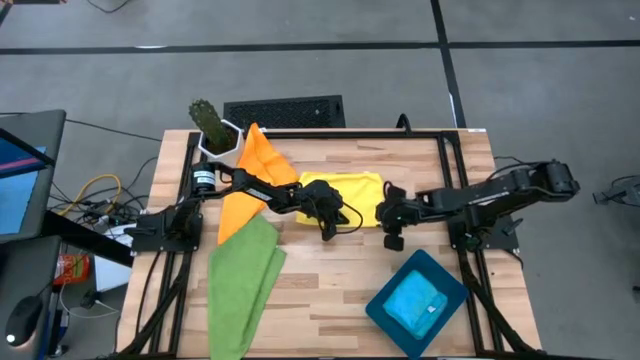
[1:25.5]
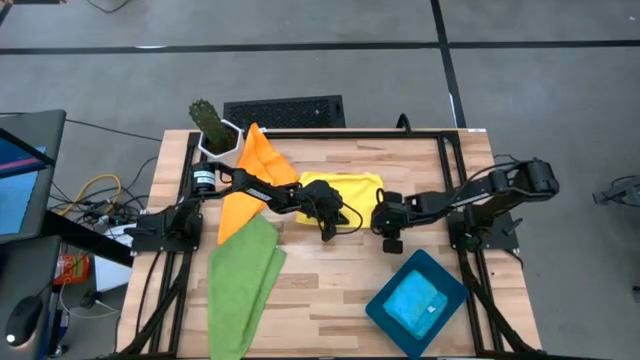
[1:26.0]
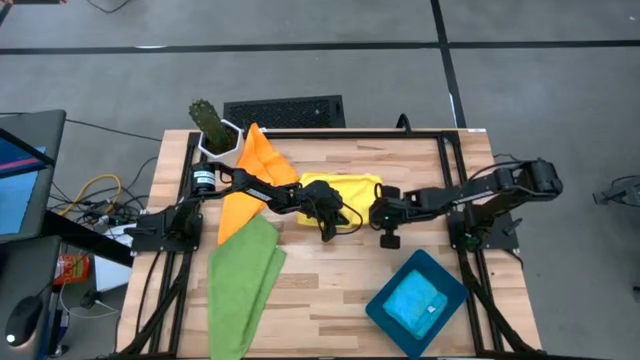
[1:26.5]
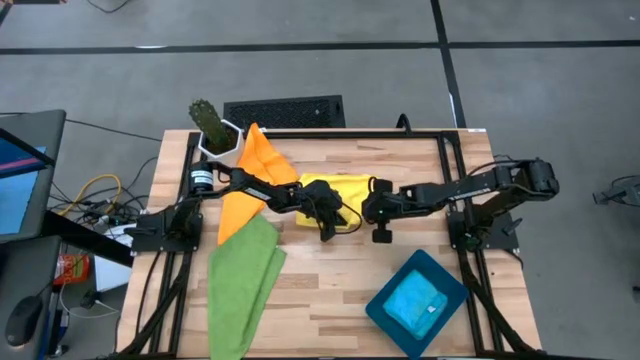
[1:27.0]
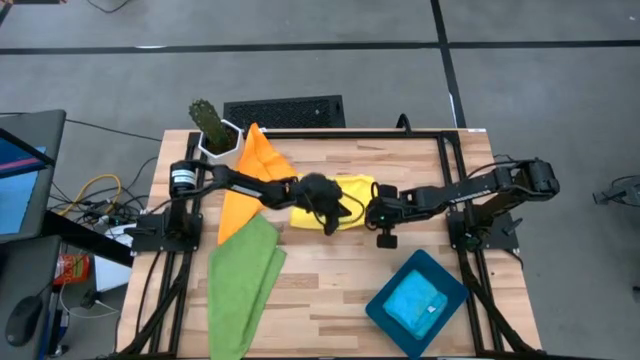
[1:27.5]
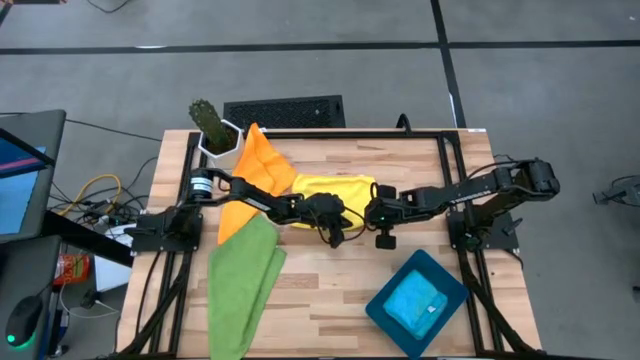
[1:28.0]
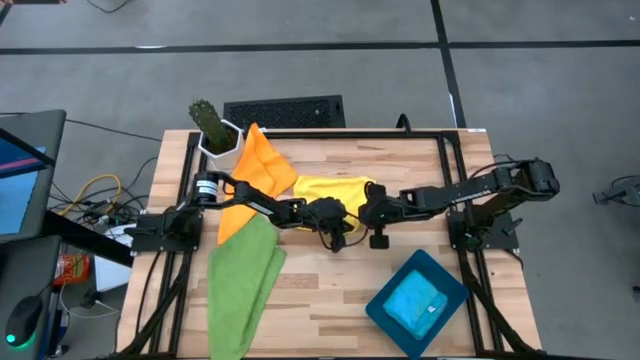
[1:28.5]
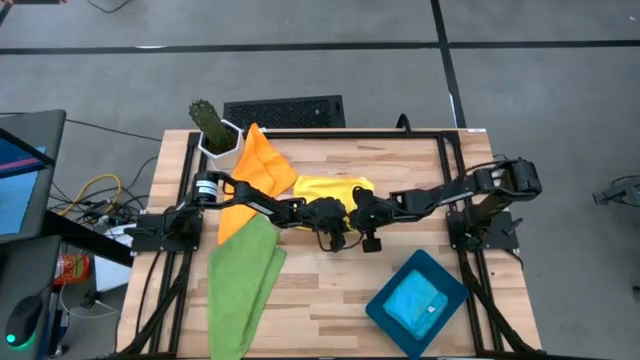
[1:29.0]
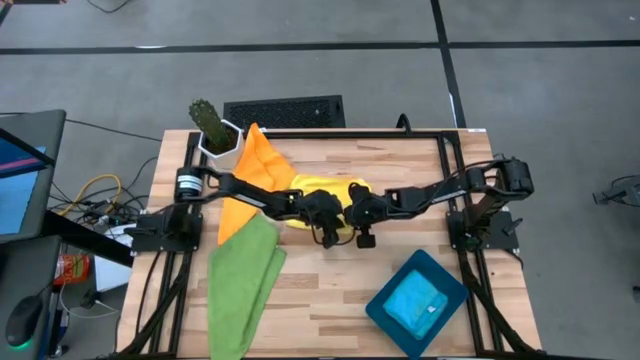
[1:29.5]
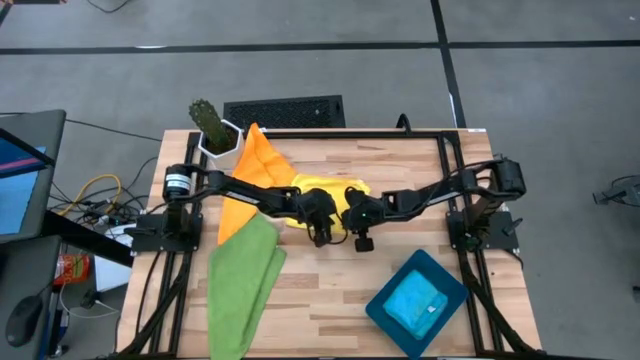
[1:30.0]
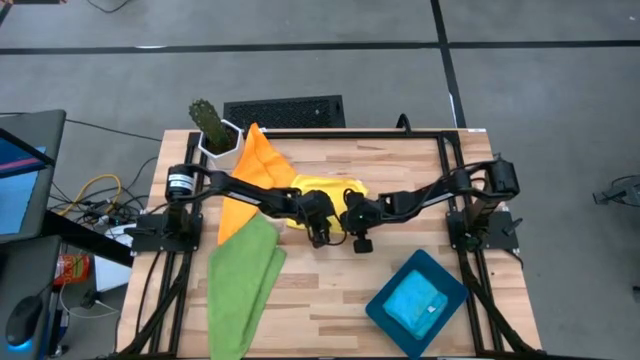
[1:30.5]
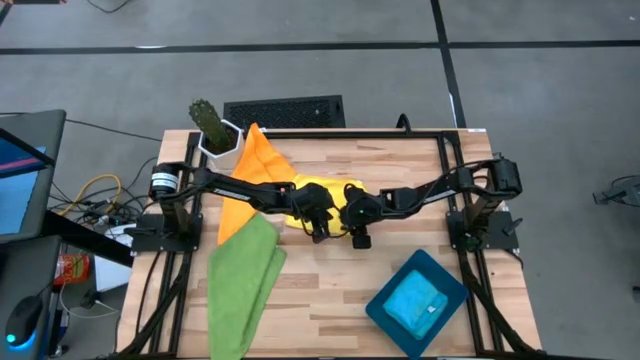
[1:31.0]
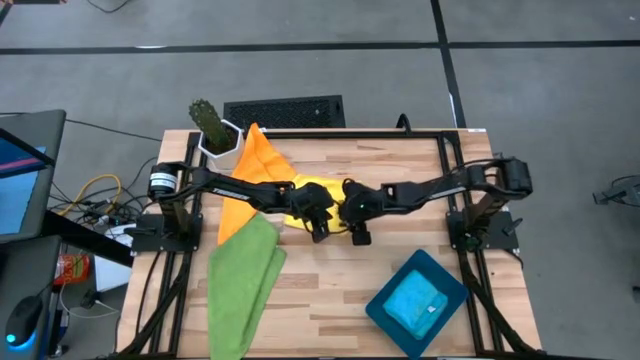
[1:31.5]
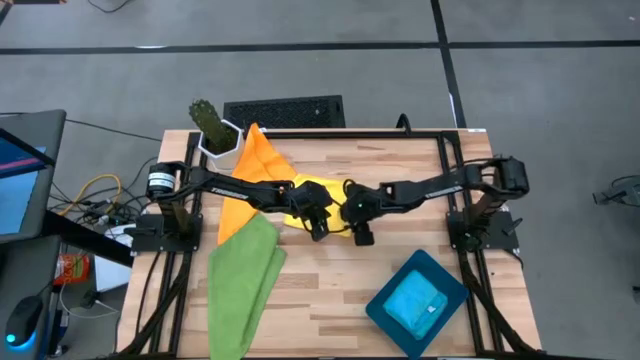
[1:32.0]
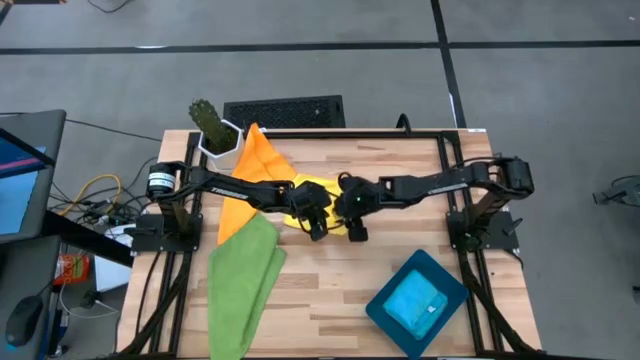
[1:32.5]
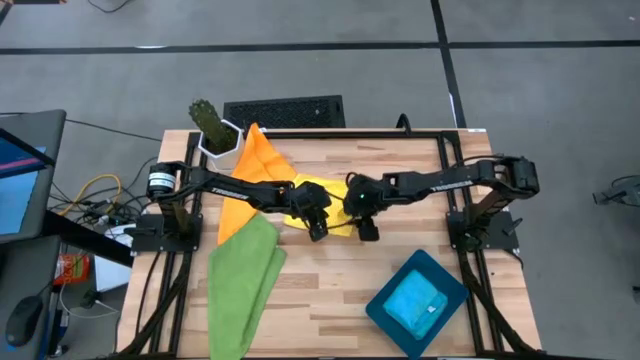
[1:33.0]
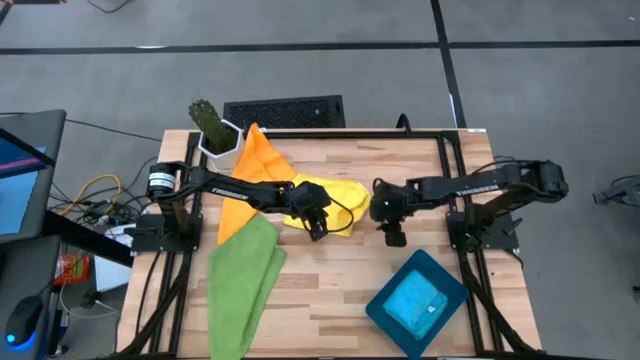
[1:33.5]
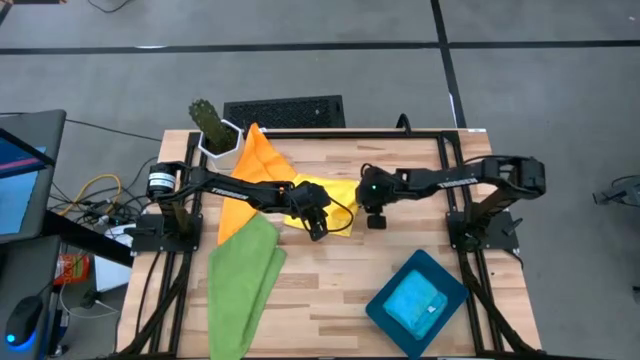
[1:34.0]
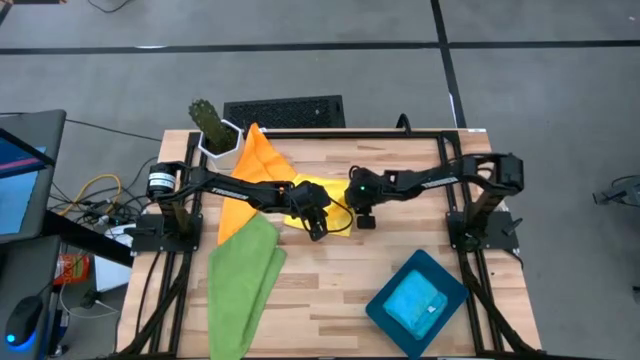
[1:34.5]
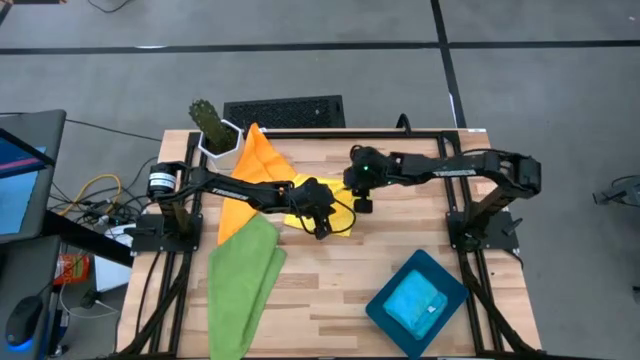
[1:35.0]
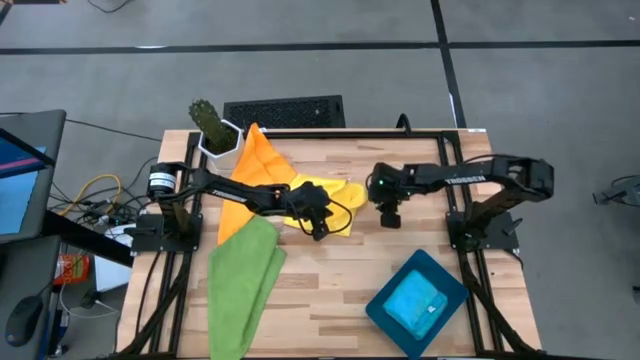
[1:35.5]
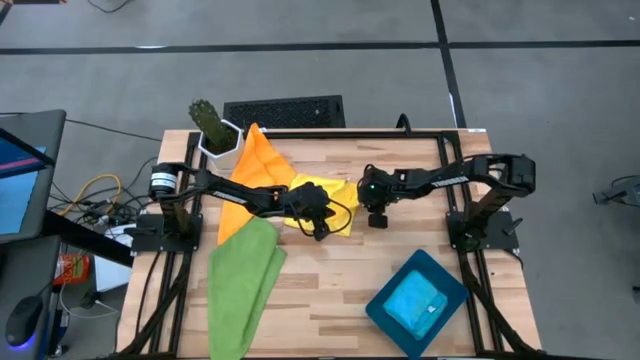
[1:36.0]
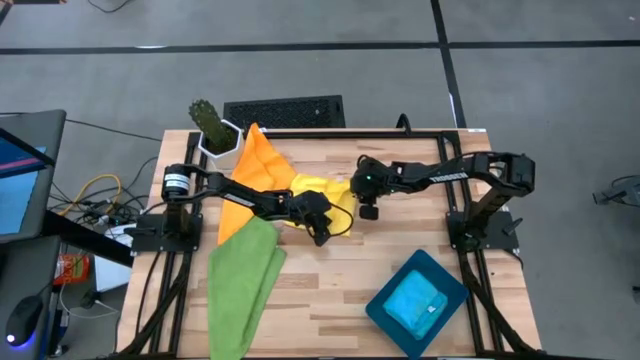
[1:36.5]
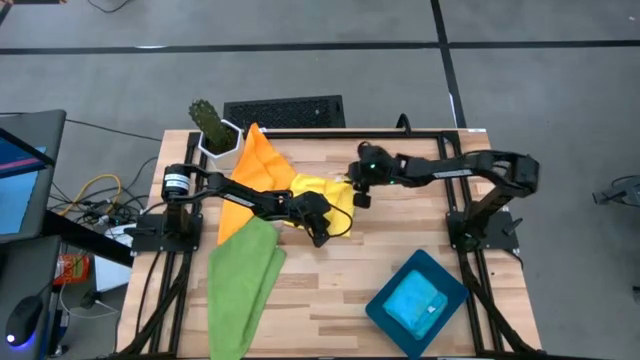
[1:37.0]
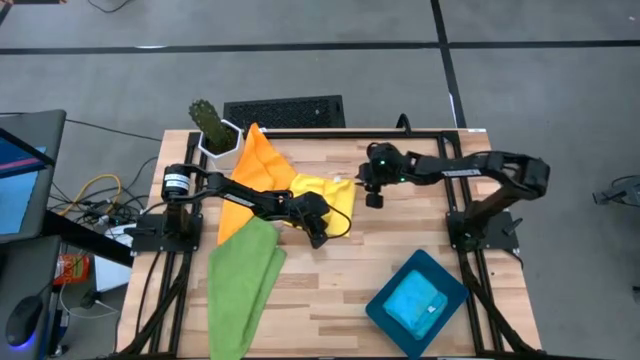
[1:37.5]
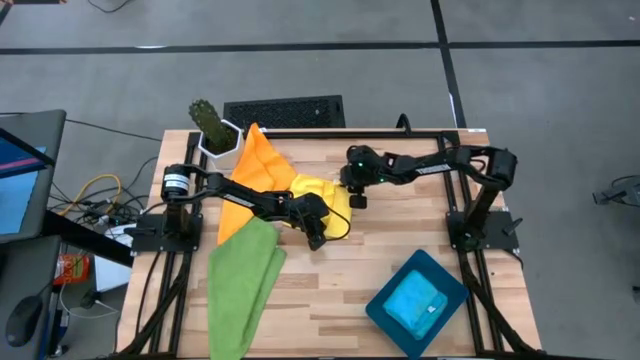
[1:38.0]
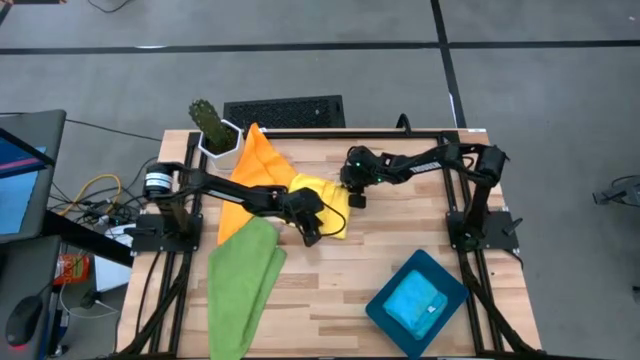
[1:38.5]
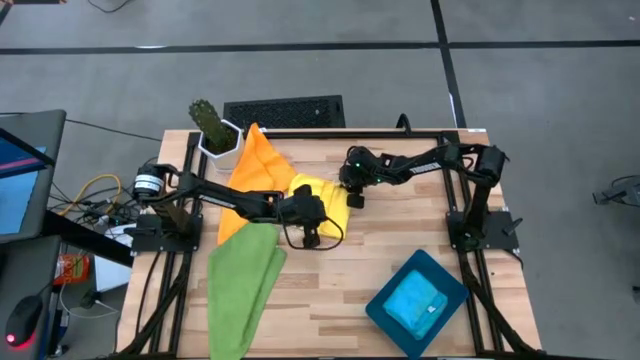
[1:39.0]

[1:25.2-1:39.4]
Task: Fold microfiber towels
Fold the yellow microfiber towel

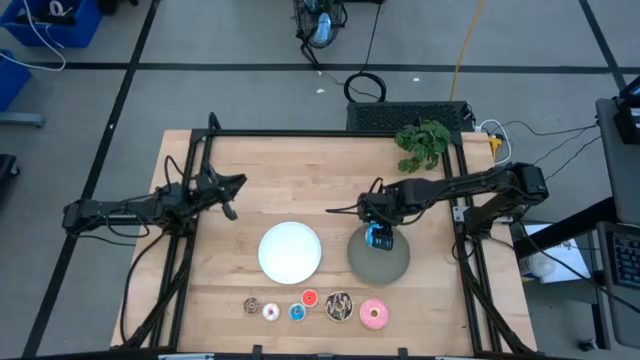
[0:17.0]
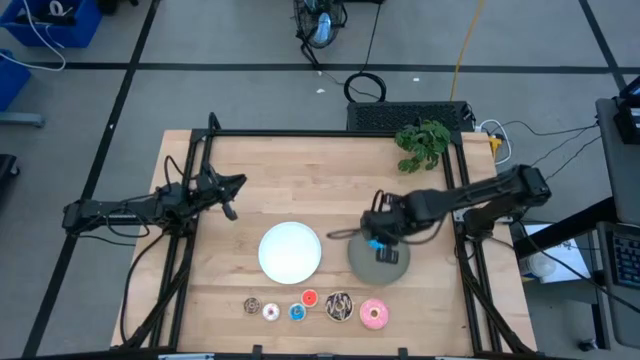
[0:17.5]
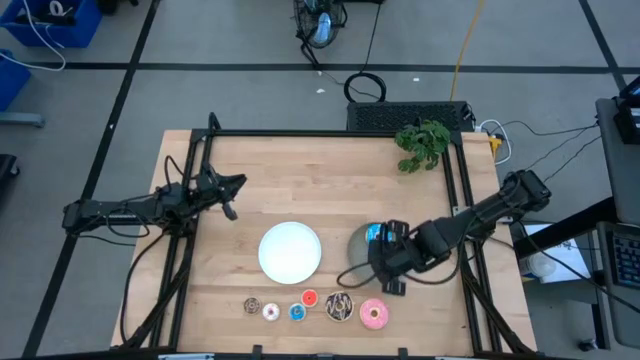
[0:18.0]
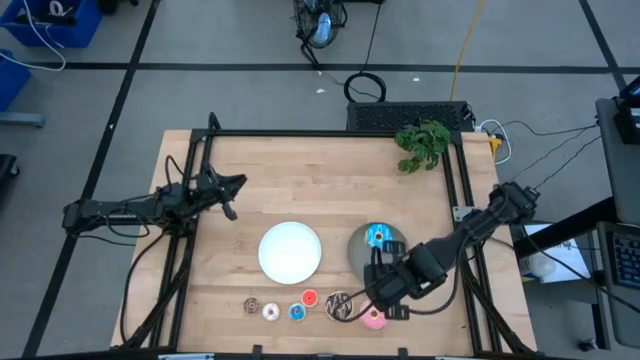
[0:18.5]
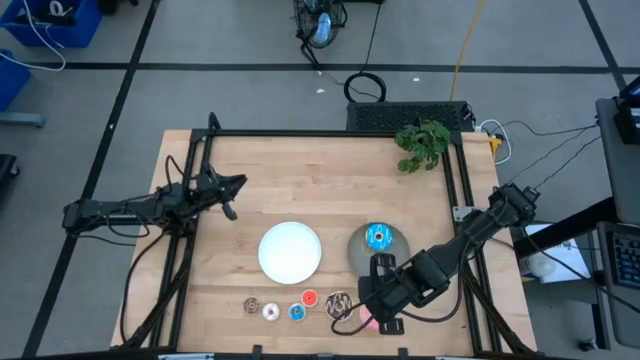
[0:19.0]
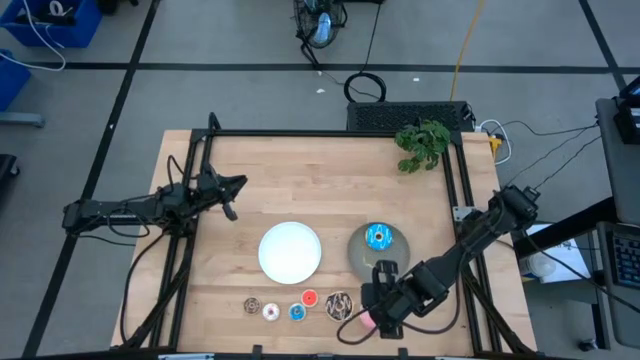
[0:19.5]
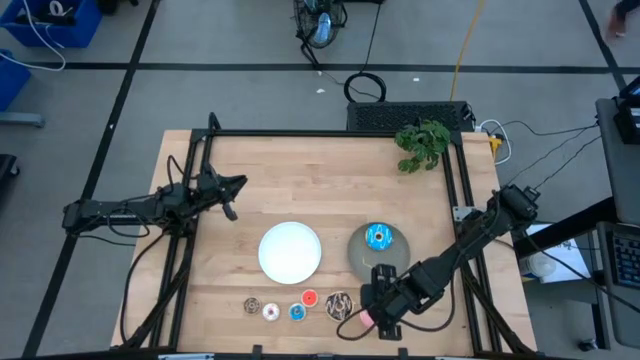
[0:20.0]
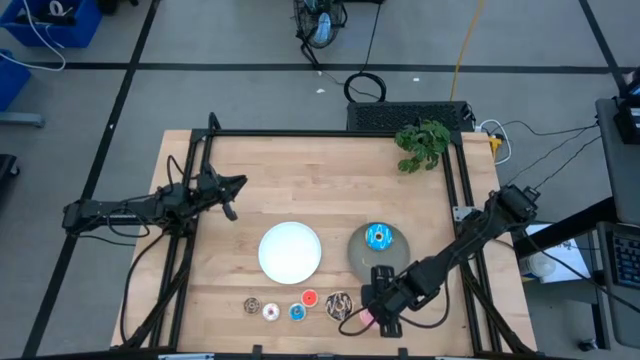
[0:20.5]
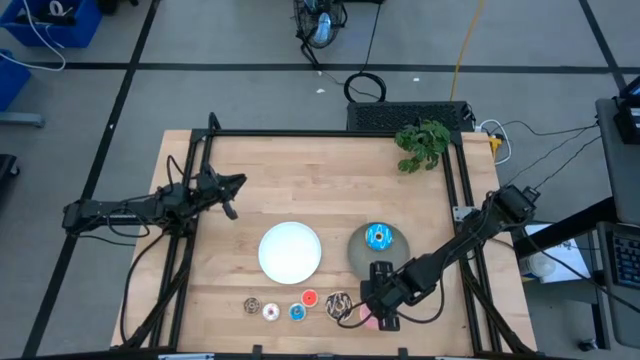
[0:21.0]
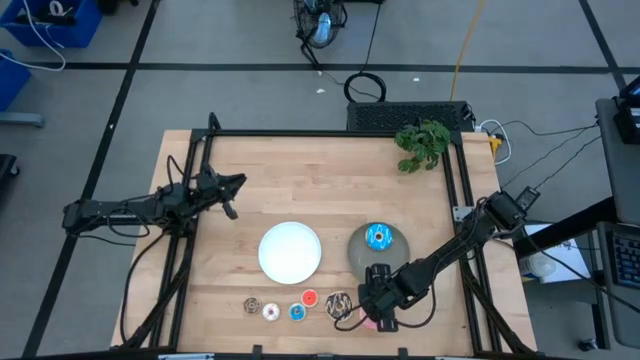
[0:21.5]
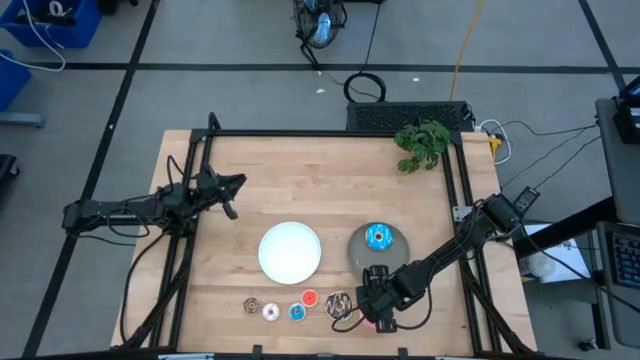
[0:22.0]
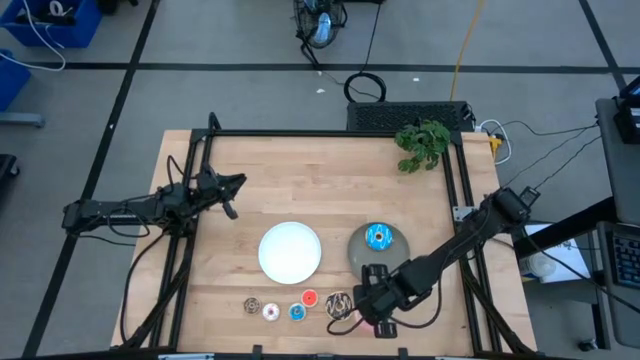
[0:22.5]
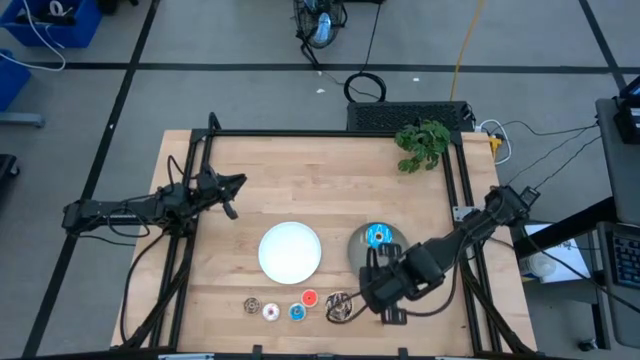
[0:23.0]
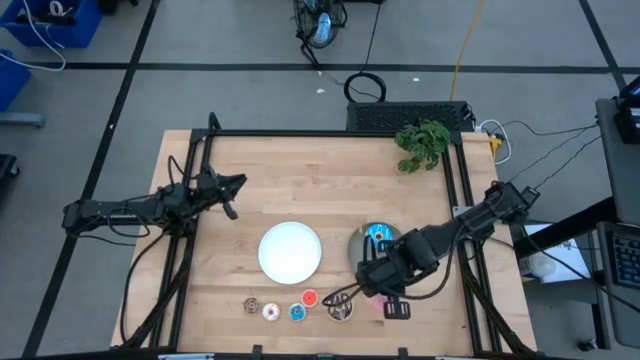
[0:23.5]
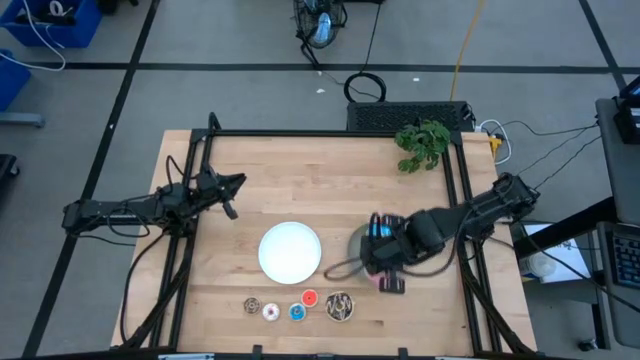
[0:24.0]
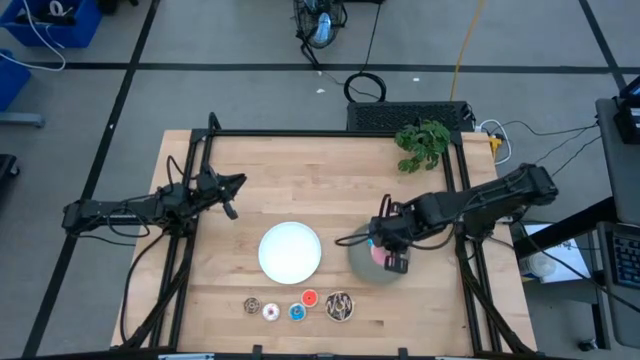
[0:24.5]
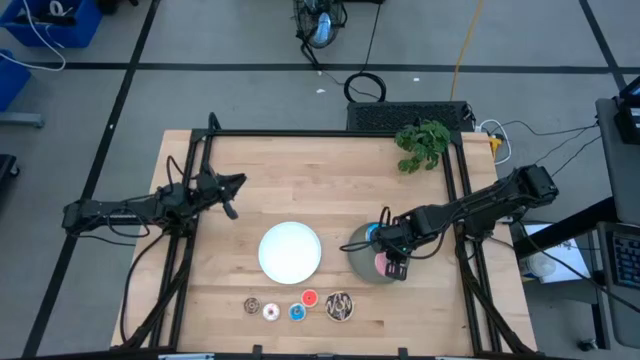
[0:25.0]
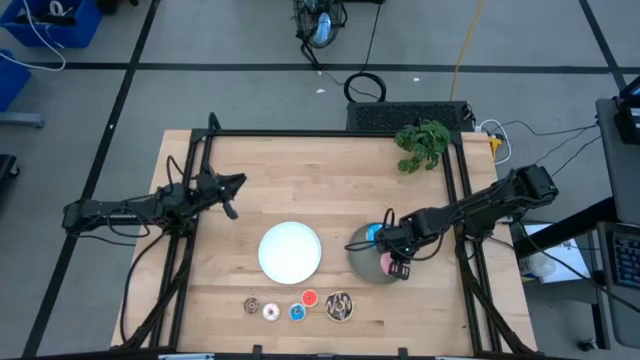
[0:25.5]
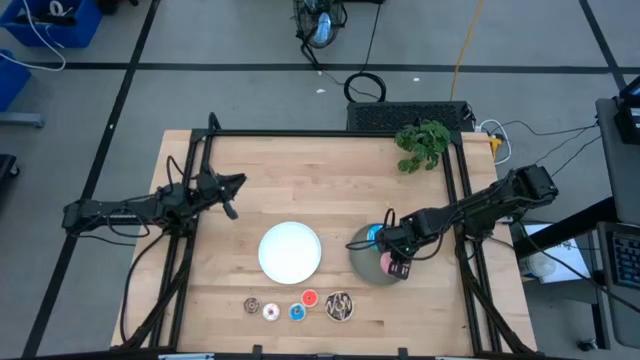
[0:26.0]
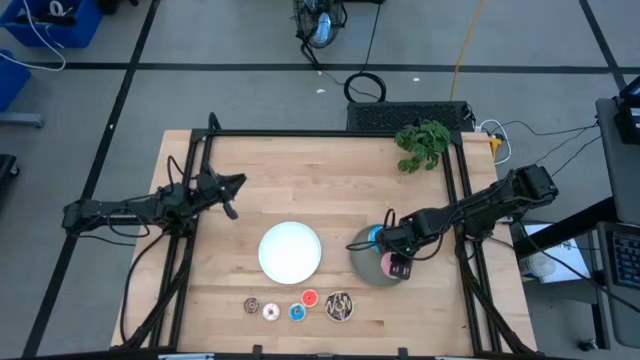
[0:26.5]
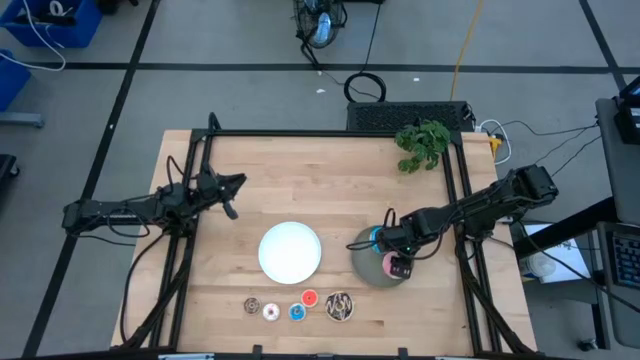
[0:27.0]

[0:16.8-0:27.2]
Task: Pick & Place donuts
Put the large pink donut on the brown plate
